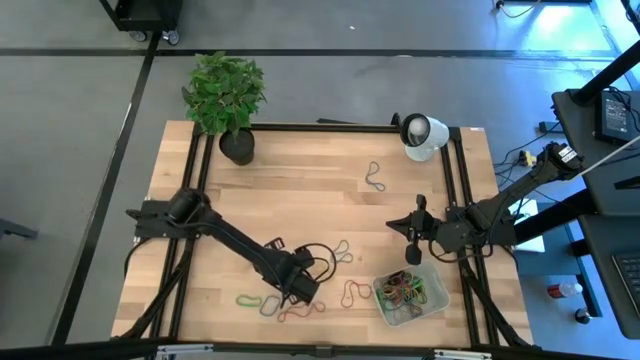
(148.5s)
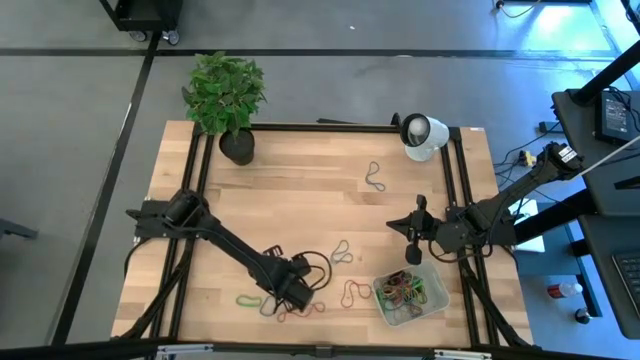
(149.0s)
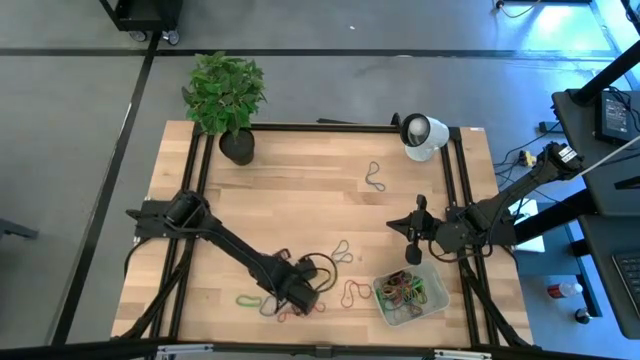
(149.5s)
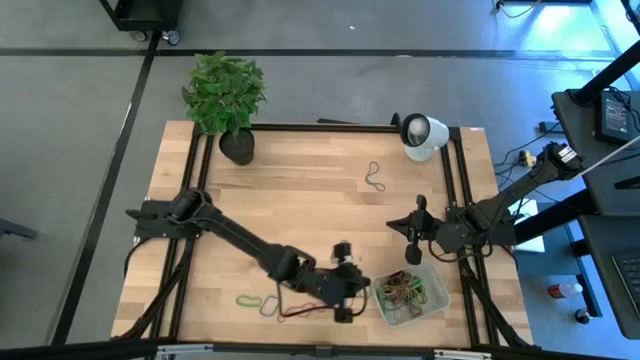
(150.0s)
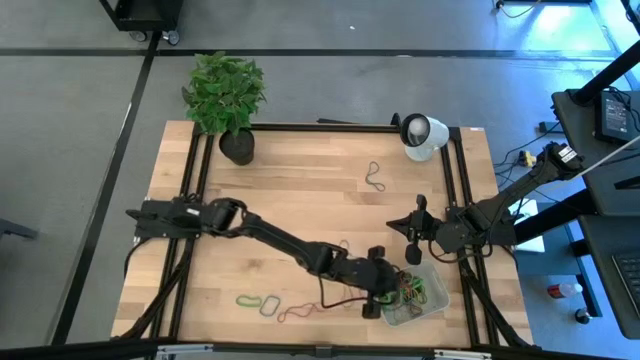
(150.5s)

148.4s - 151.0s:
Task: Pick and place rubber bands into bin
Put the green rubber band into the white bin

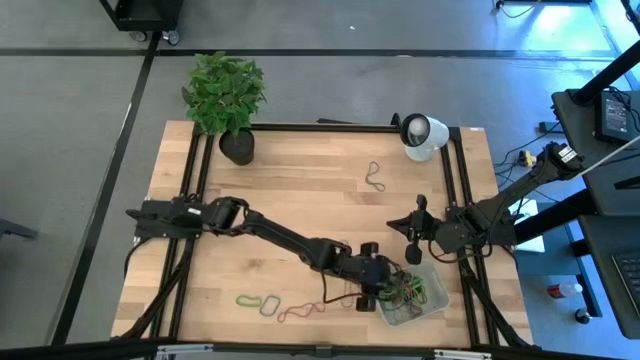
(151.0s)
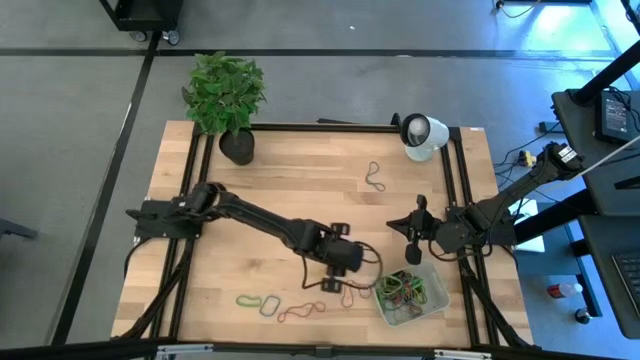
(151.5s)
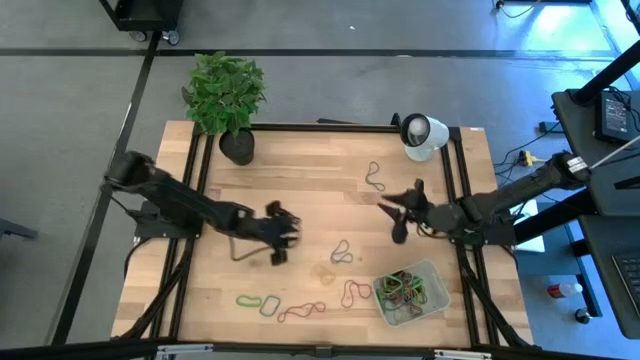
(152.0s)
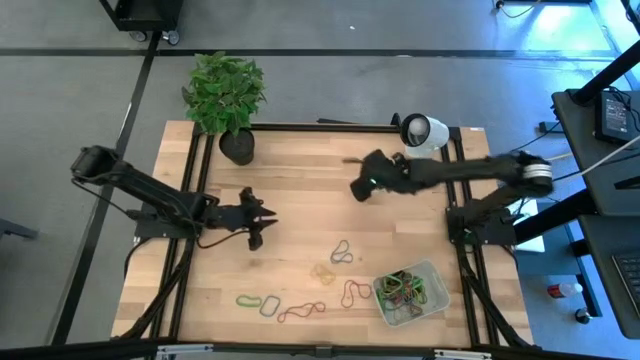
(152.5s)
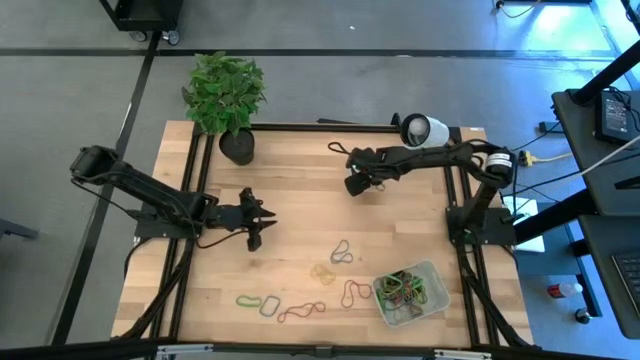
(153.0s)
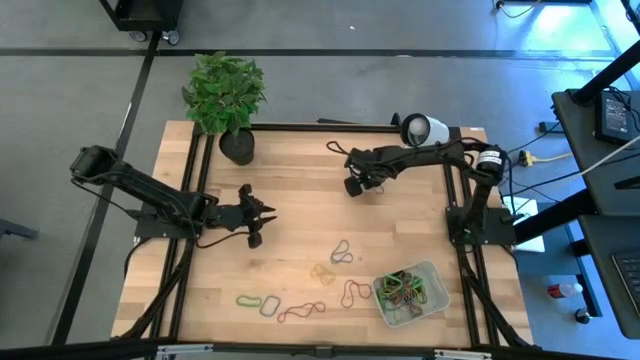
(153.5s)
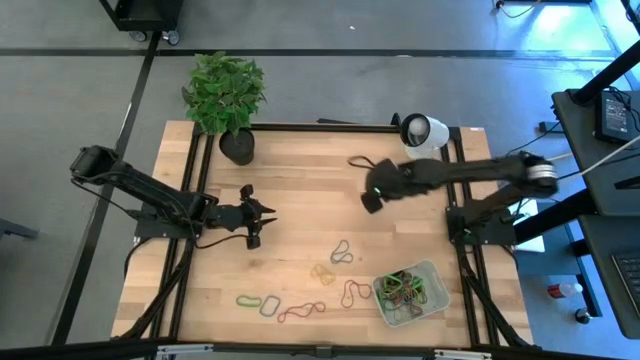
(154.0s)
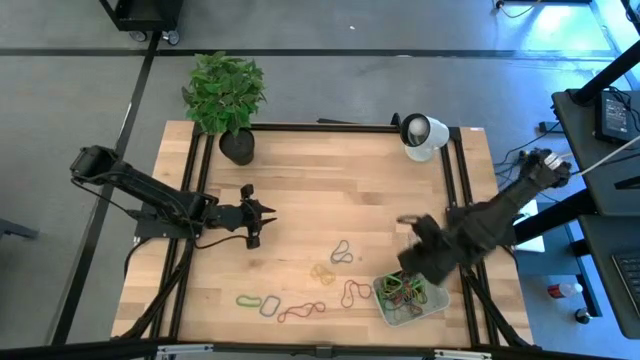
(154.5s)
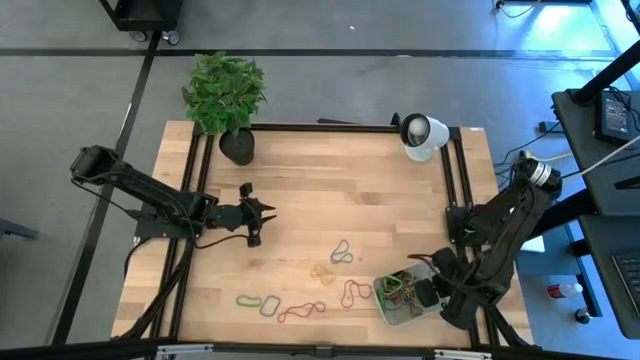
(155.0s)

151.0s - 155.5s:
Put the blue rubber band into the white bin

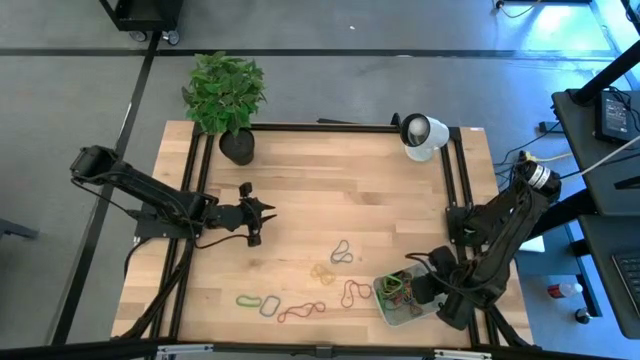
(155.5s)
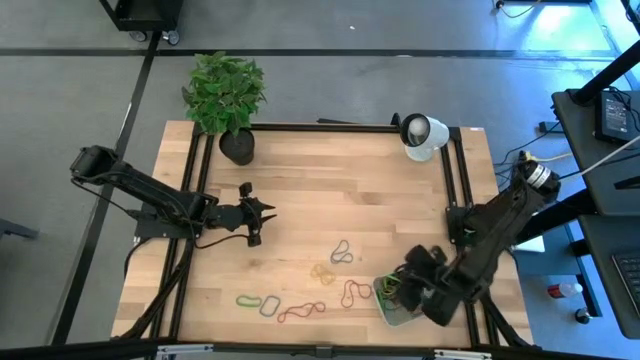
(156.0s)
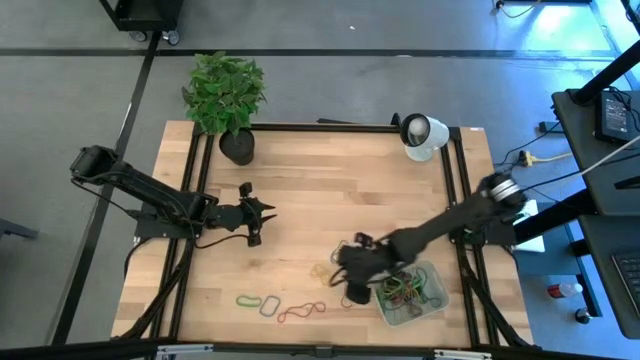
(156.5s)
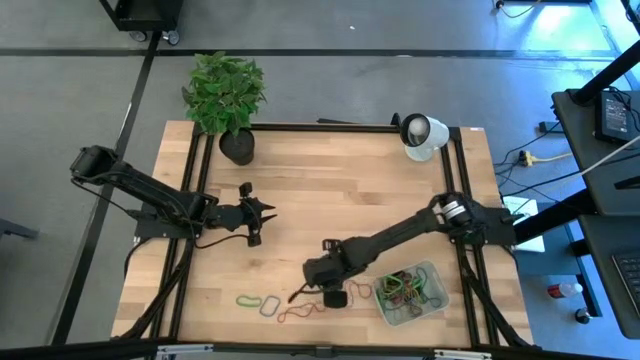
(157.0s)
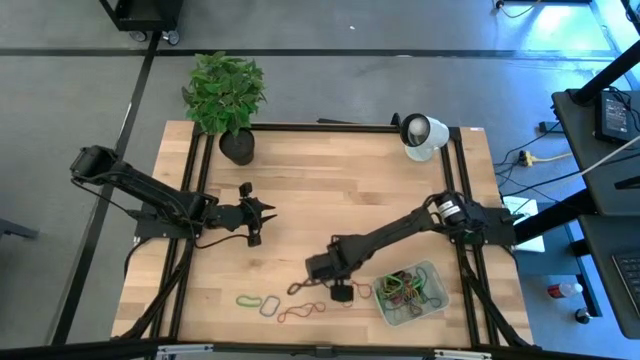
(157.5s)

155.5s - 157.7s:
Put the yellow rubber band into the white bin

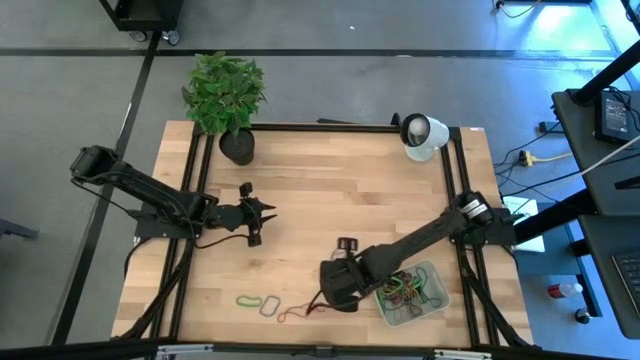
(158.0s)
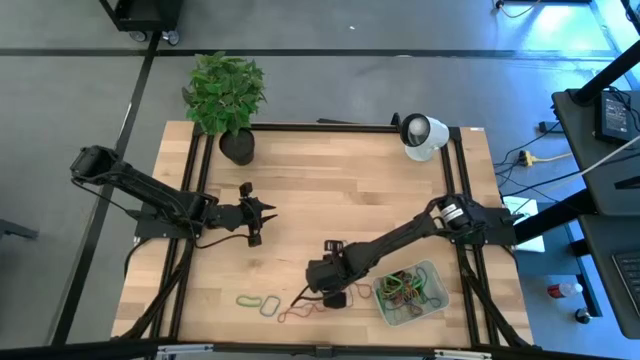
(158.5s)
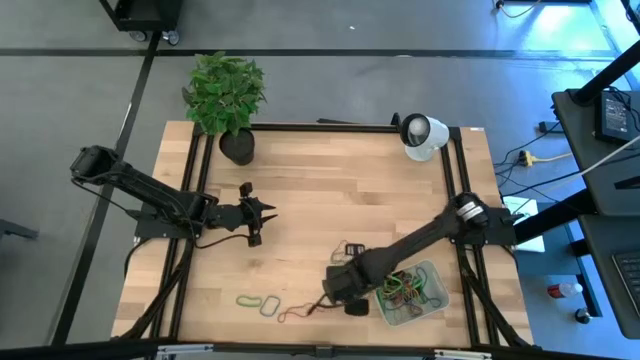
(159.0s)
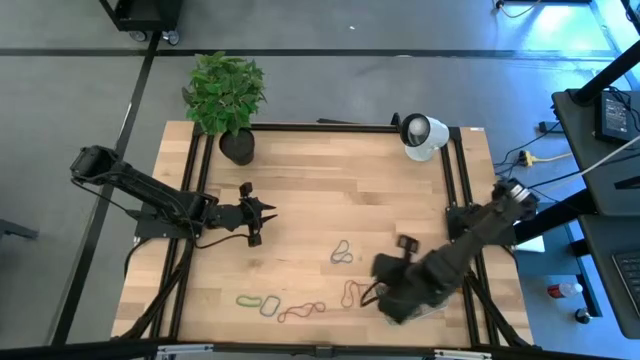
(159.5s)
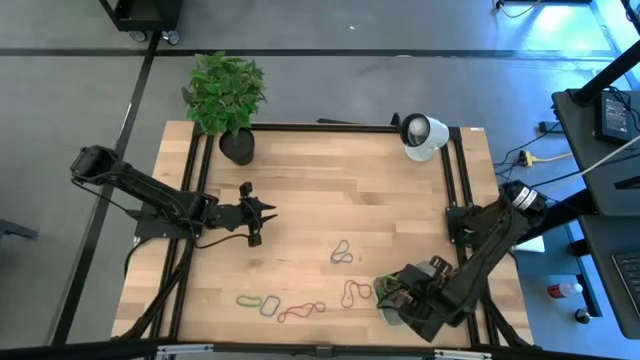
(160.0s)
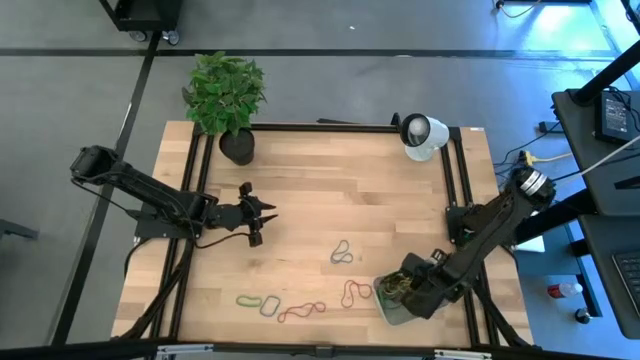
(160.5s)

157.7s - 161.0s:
Put the yellow rubber band into the white bin

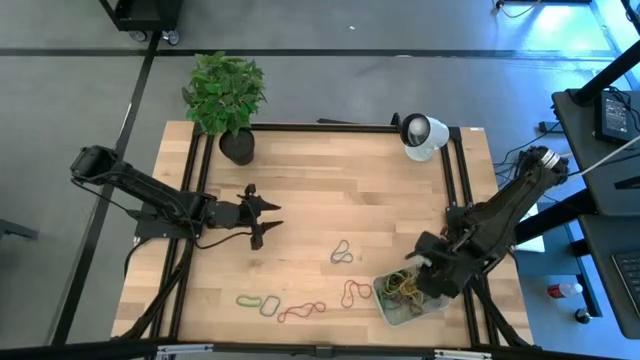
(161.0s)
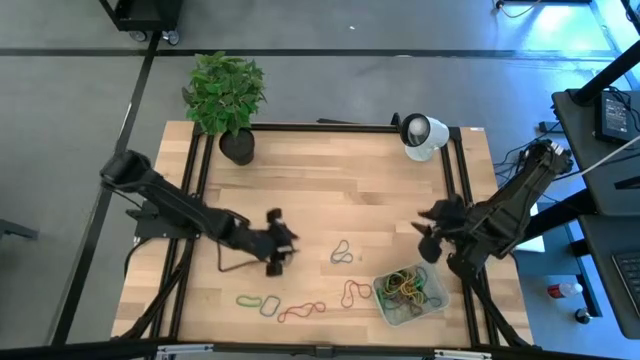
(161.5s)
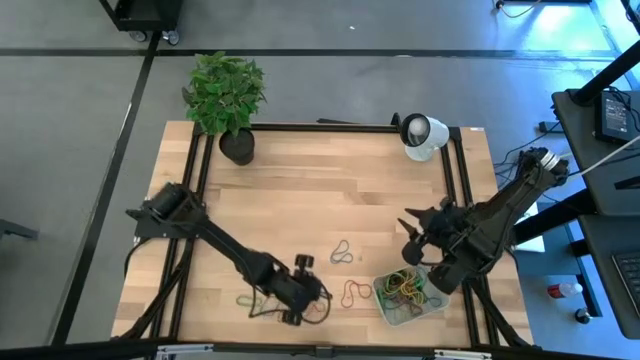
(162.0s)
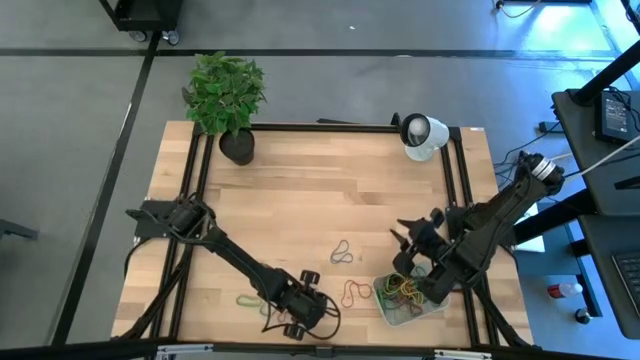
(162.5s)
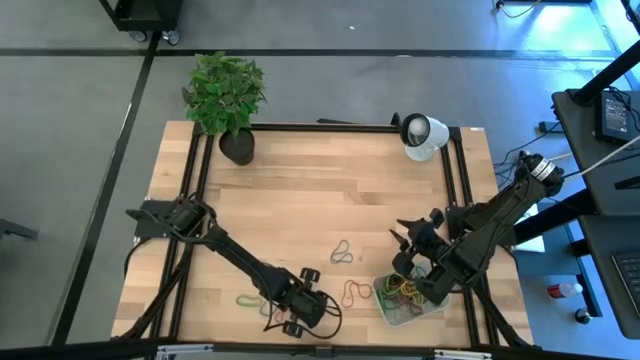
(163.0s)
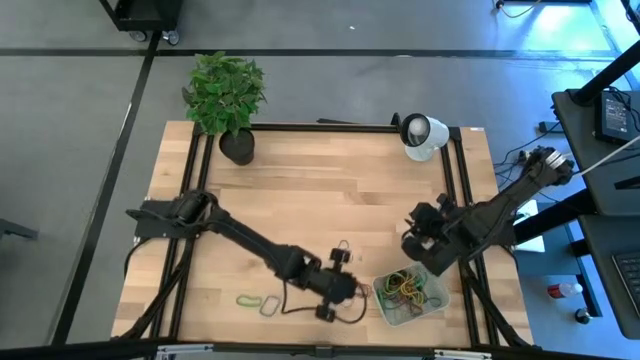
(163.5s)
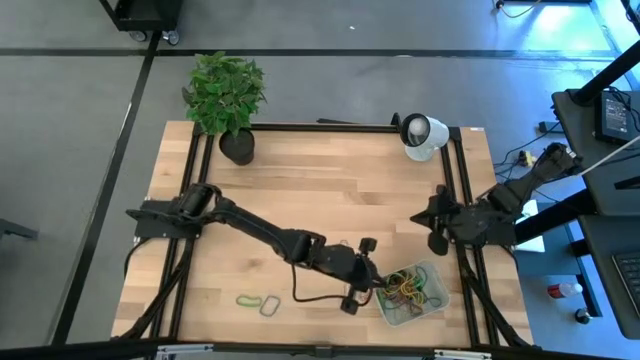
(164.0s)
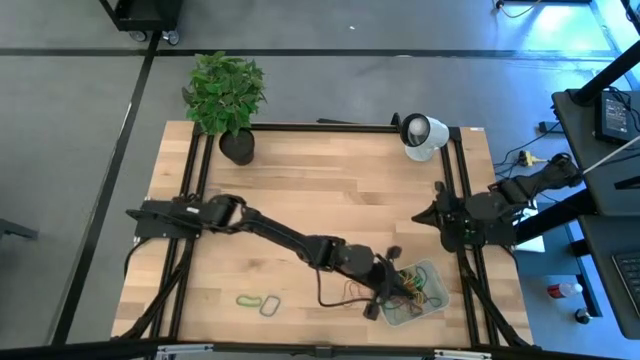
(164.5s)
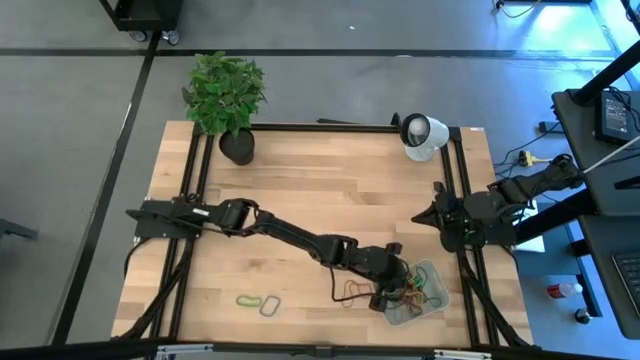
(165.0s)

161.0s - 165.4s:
Put the red rubber band into the white bin

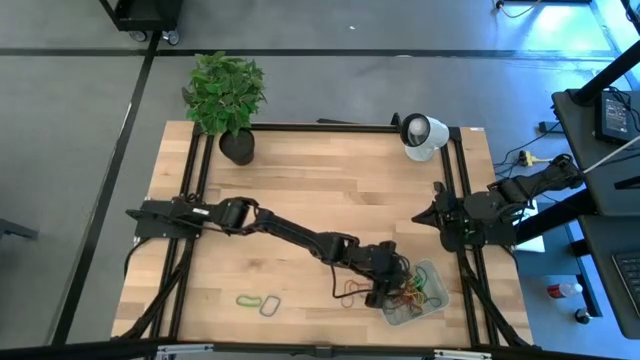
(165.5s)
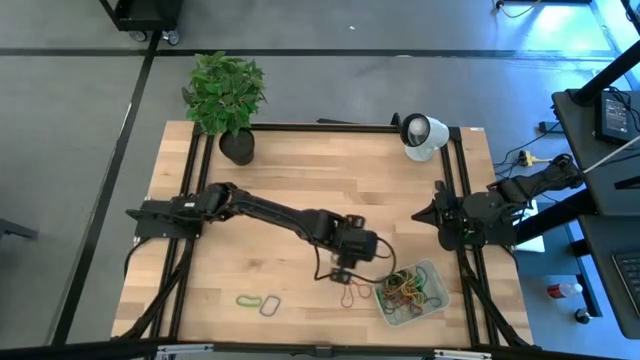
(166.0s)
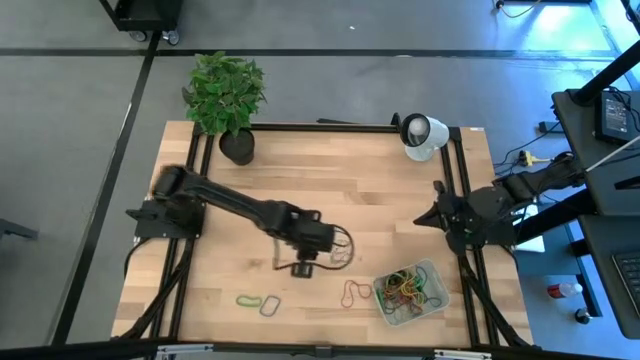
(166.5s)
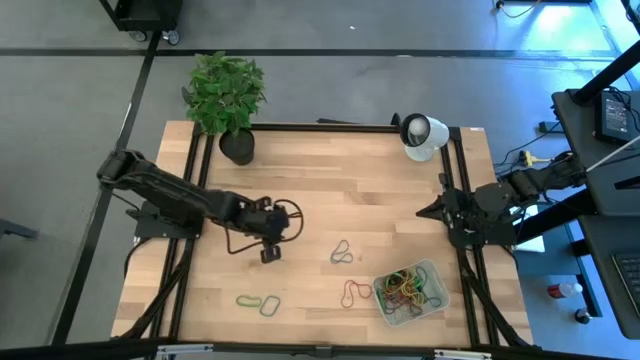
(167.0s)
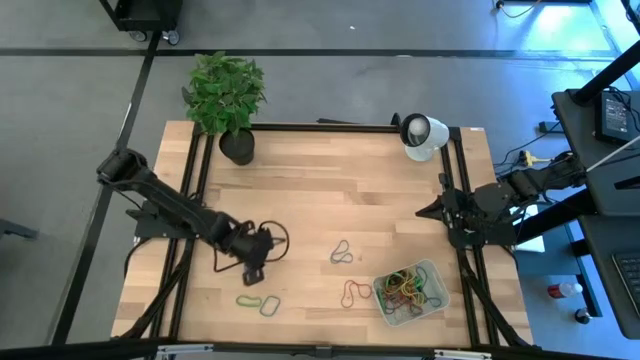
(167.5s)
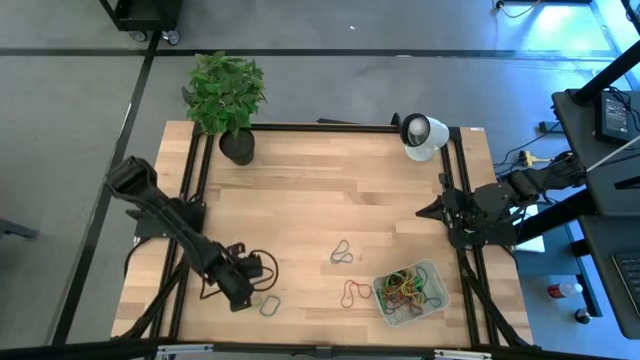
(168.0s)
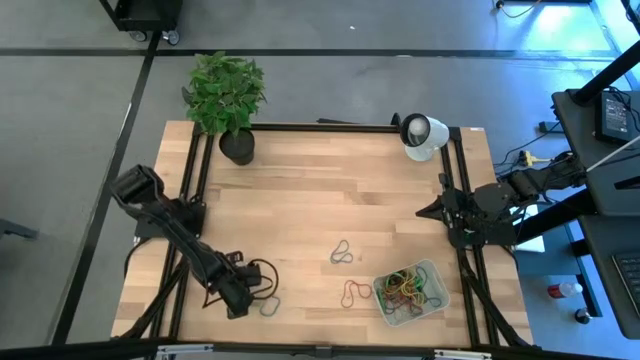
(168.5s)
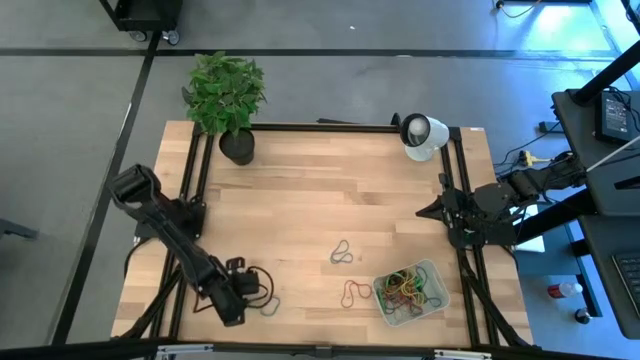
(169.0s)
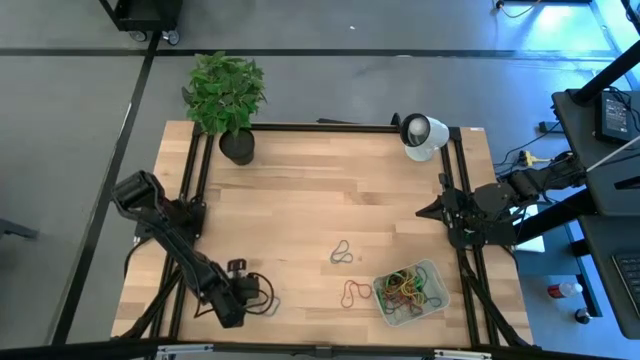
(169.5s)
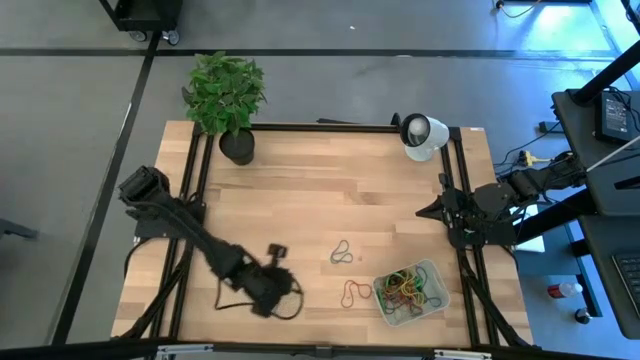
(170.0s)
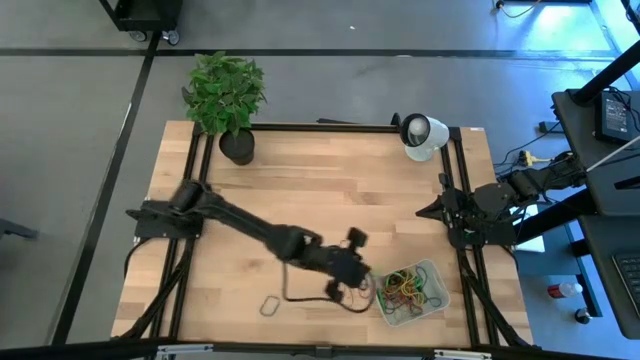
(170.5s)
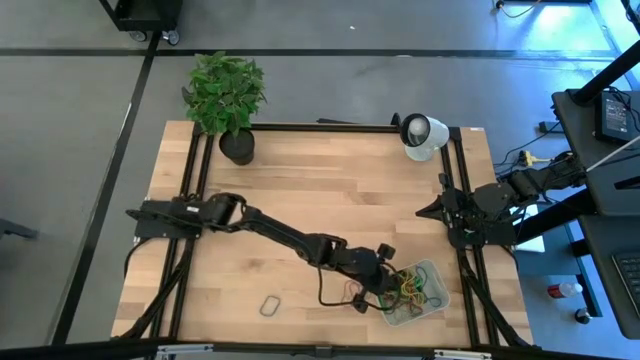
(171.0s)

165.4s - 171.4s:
Put the green rubber band into the white bin
